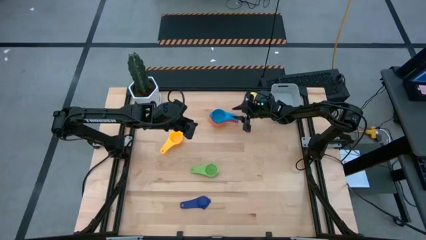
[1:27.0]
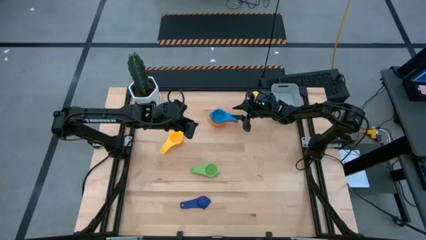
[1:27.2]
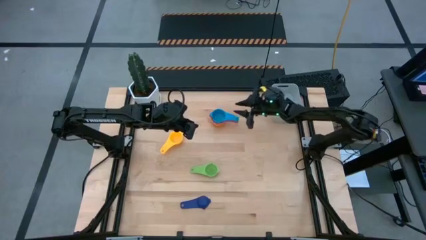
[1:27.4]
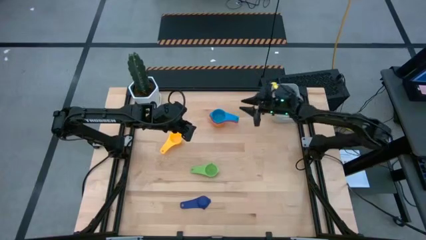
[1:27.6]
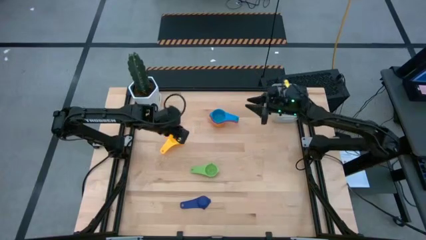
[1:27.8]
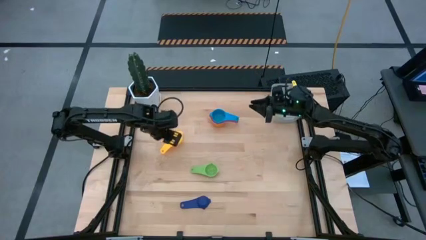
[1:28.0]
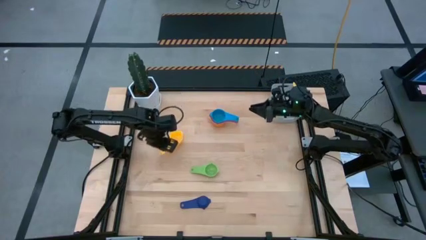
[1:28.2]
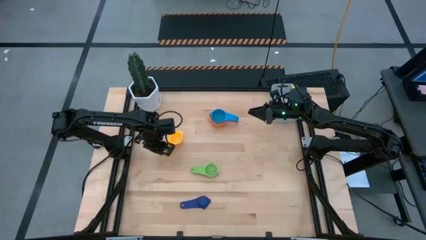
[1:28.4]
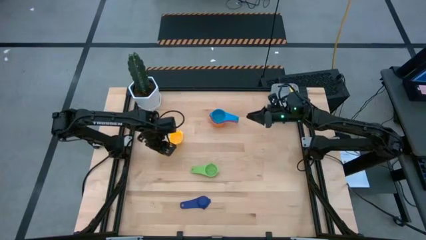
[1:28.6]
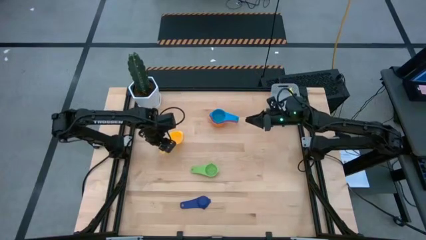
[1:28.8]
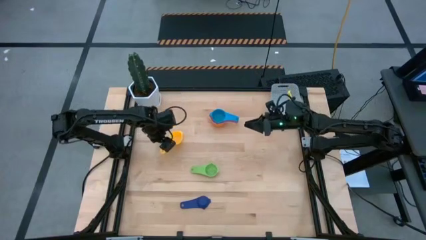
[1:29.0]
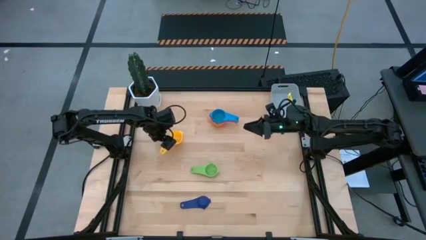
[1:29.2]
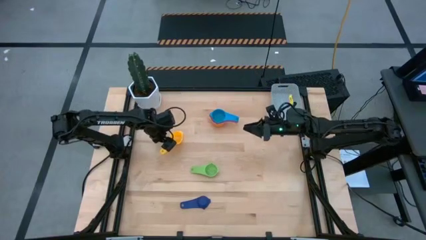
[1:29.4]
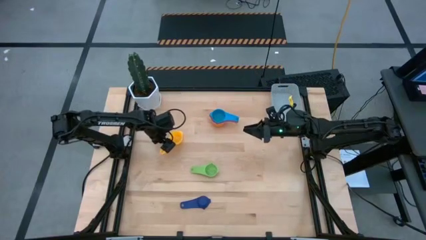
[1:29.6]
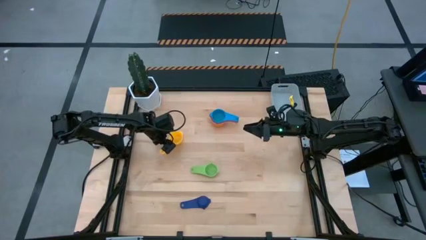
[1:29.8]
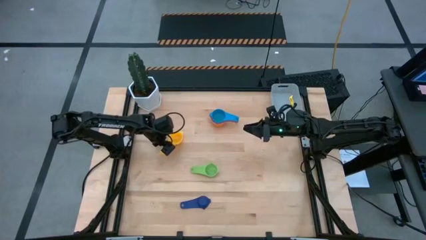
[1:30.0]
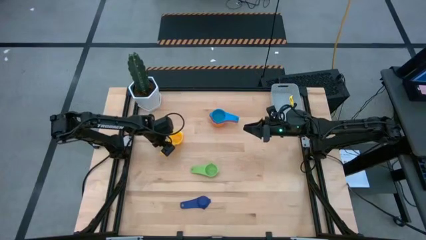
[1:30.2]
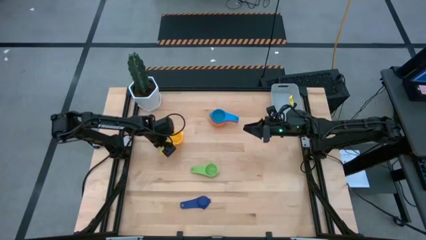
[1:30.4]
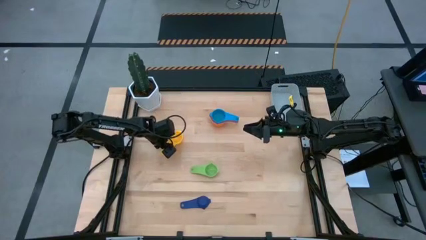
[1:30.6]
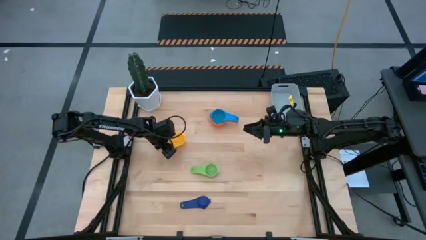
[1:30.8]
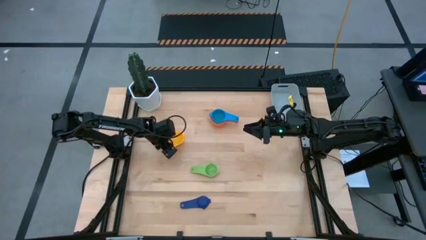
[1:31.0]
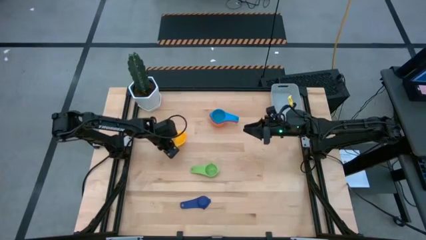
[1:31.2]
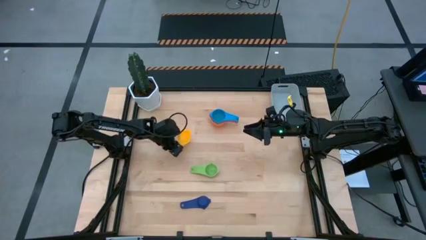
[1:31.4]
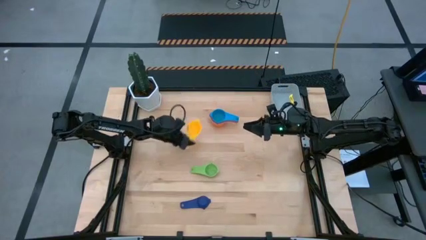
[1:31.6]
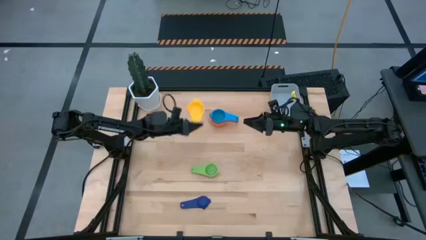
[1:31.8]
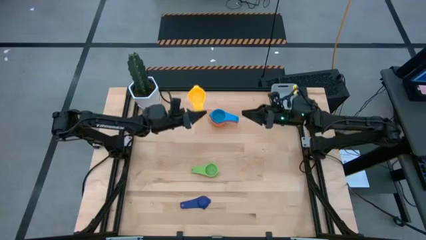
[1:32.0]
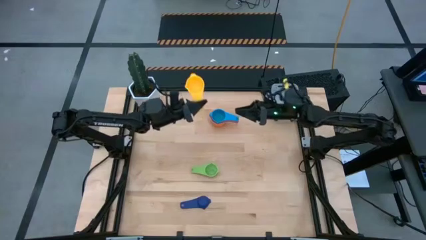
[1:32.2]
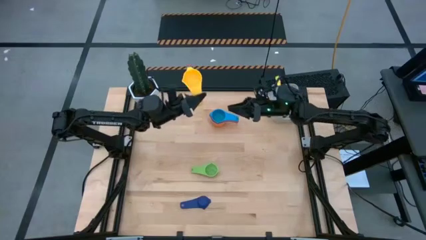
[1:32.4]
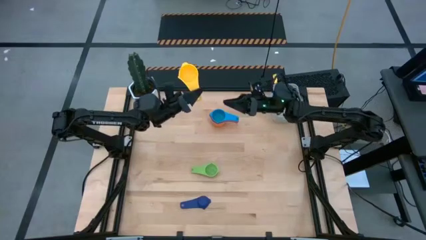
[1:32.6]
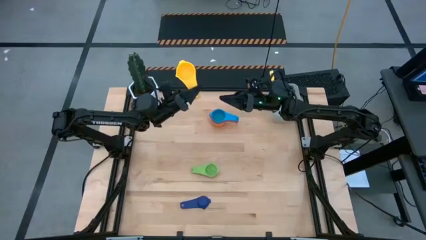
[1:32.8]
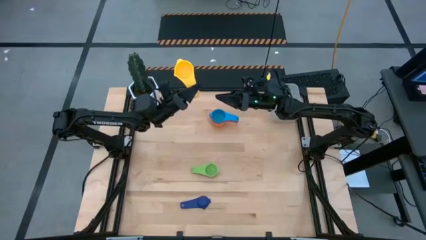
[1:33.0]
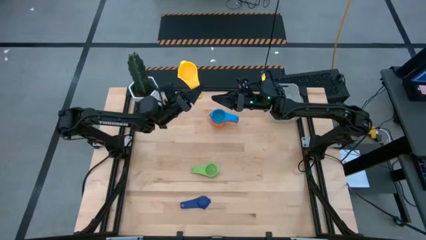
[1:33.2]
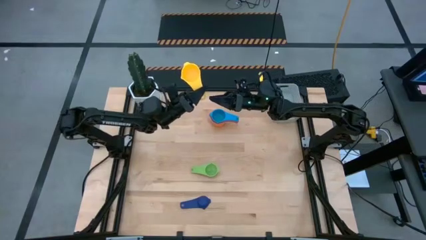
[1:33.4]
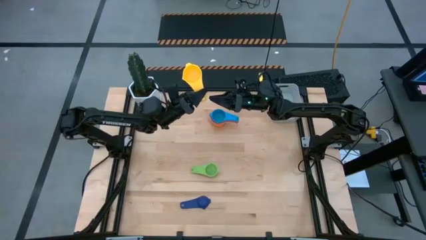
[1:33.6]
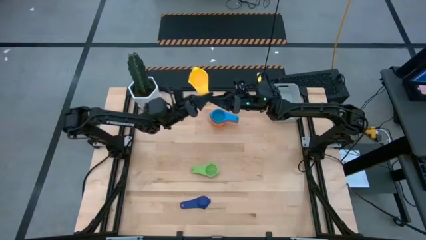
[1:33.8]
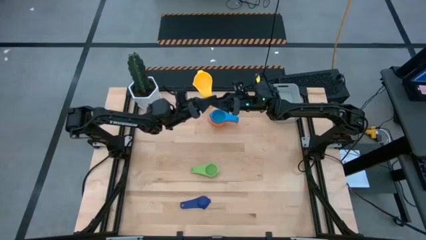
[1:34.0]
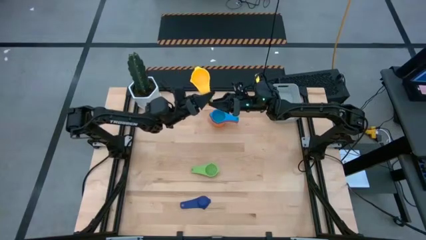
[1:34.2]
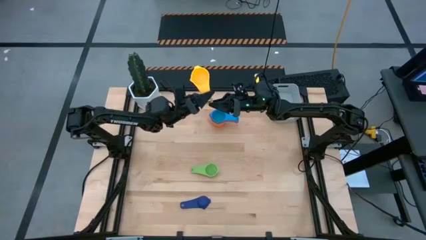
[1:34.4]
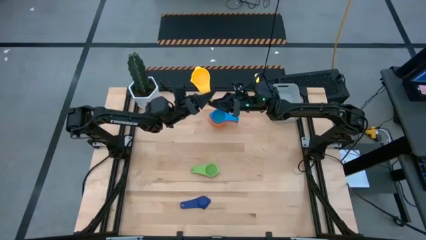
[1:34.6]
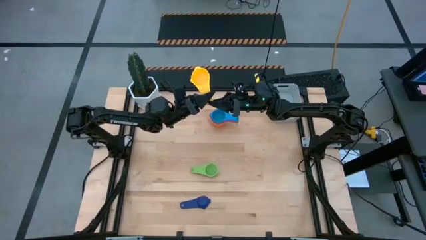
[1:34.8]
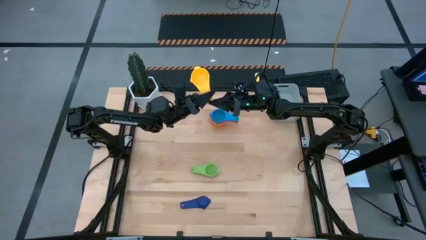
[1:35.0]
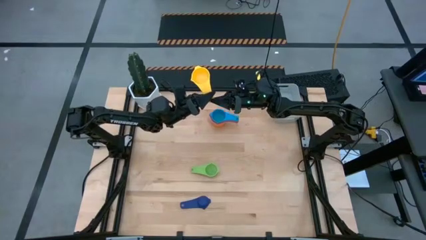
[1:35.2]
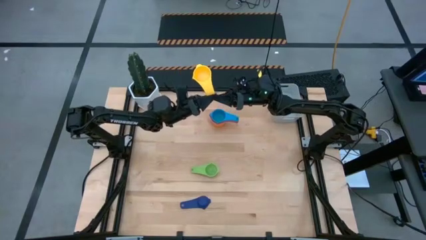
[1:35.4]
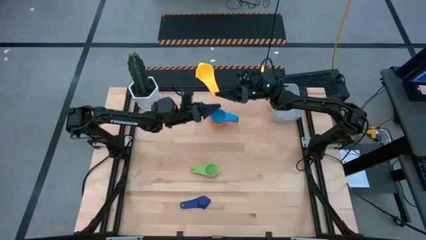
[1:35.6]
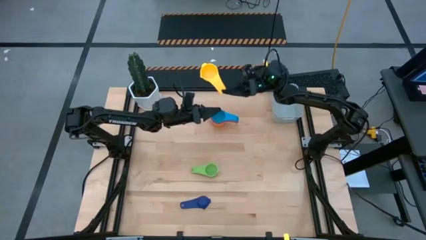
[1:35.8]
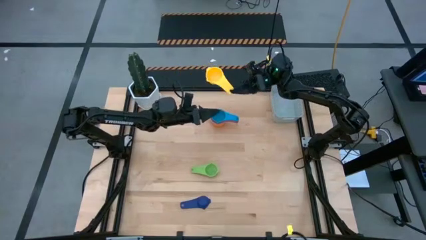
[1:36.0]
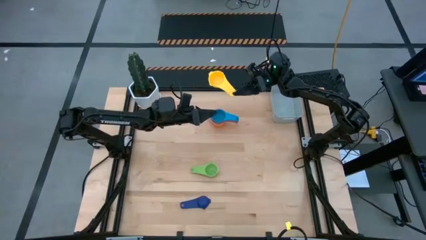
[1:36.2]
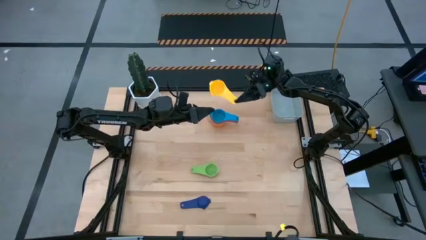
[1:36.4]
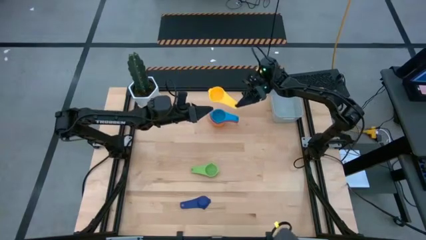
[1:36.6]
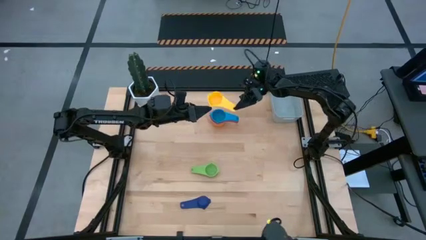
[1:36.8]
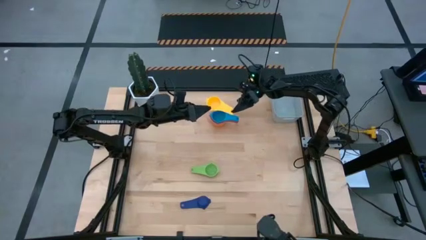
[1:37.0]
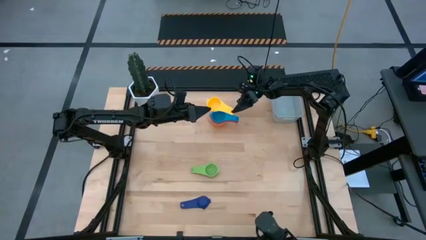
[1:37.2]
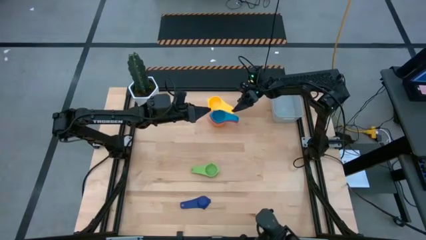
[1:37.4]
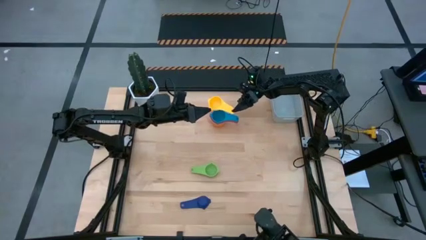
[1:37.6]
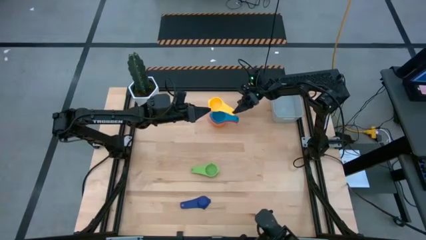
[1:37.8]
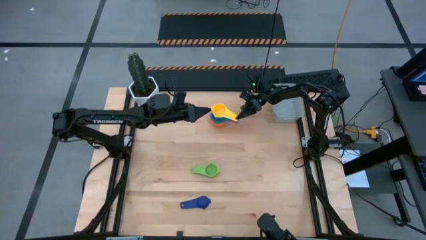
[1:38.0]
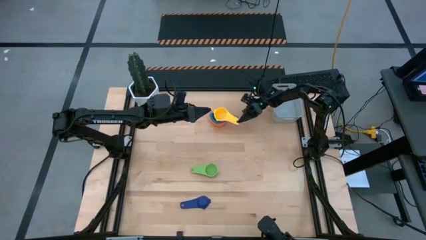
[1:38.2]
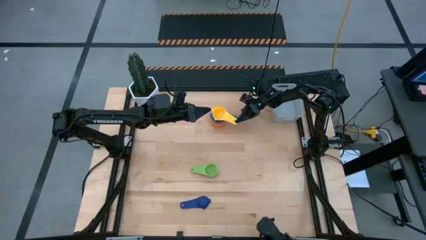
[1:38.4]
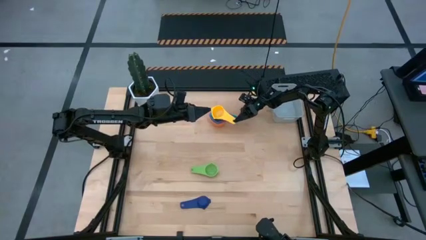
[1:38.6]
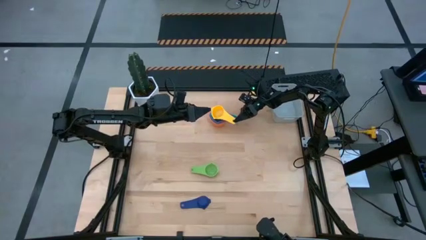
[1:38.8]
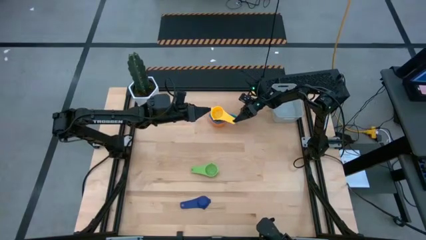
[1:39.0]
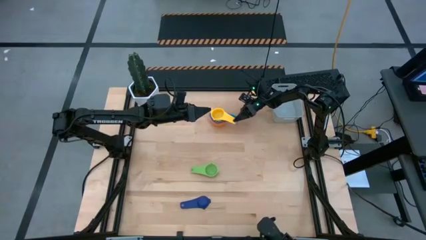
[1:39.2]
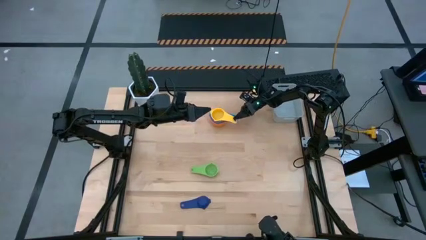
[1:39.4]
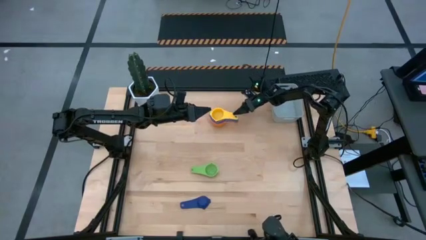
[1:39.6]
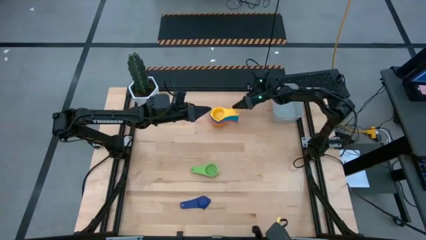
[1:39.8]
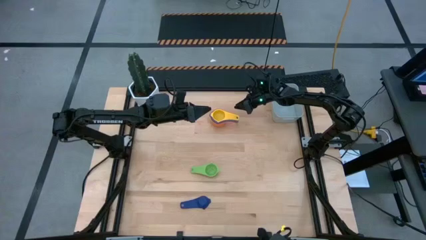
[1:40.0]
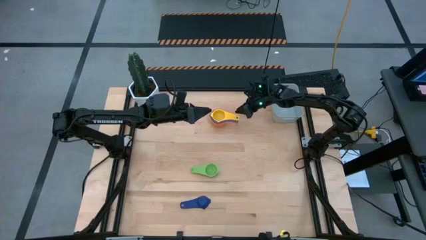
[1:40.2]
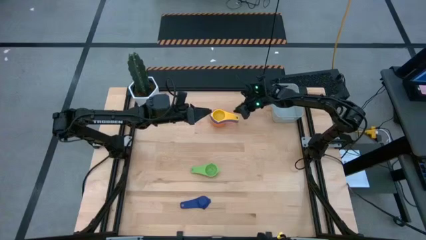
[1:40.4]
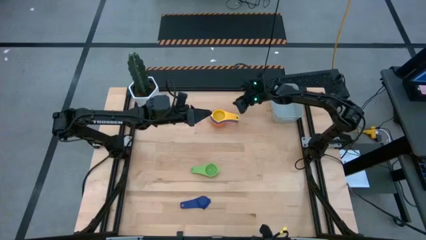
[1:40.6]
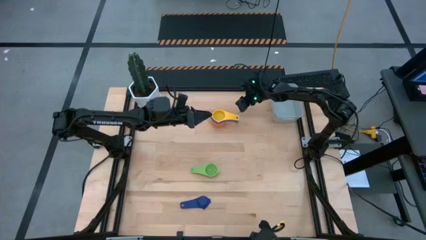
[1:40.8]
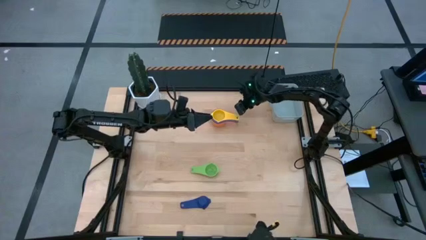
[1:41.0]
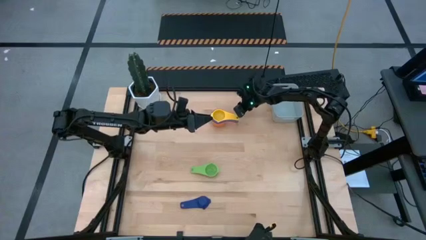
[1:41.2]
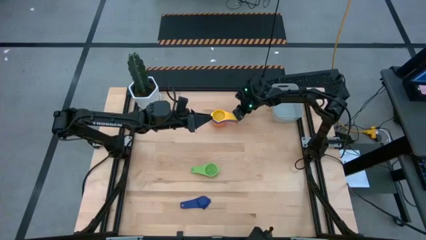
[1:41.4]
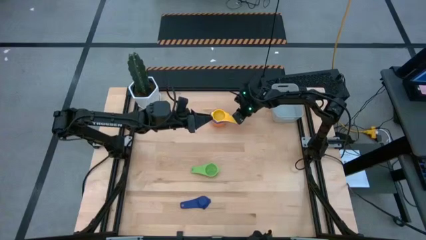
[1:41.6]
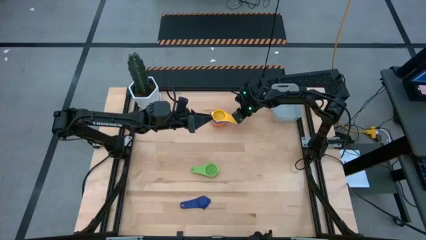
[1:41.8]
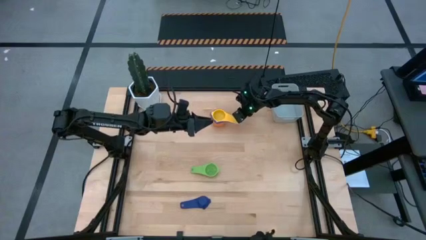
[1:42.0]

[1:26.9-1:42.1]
Task: Nest measuring cups in basket
Stack the yellow measuring cup on top of the light blue measuring cup

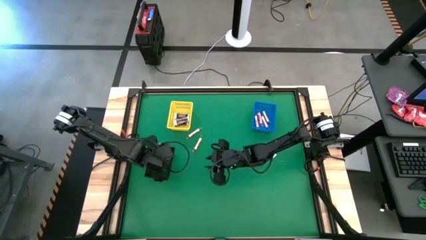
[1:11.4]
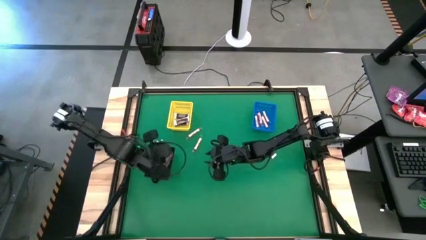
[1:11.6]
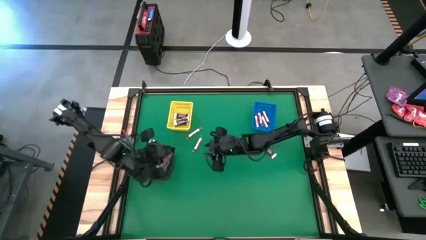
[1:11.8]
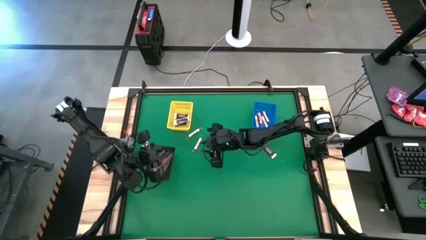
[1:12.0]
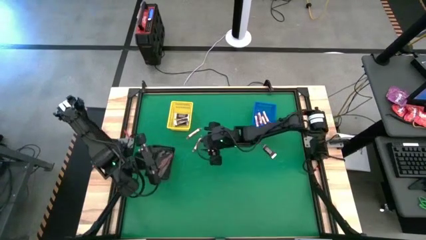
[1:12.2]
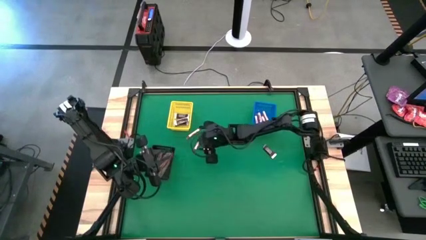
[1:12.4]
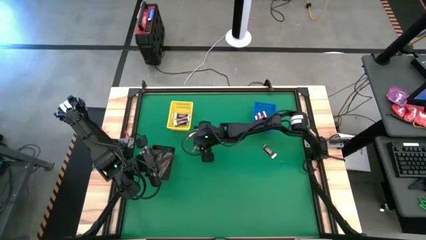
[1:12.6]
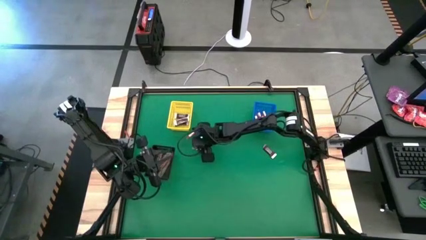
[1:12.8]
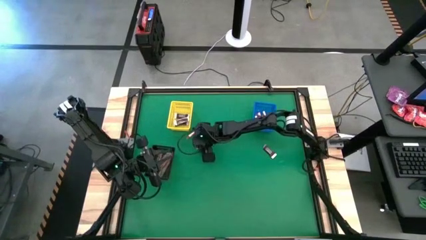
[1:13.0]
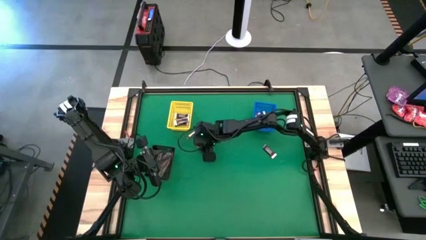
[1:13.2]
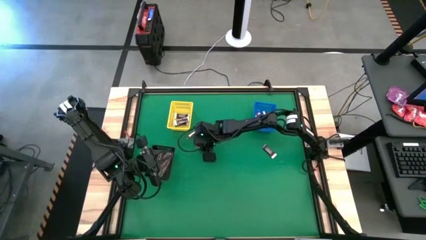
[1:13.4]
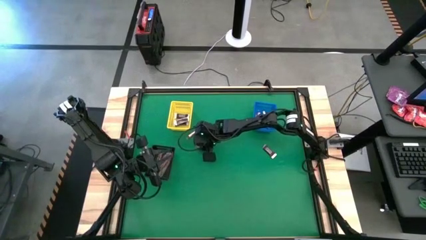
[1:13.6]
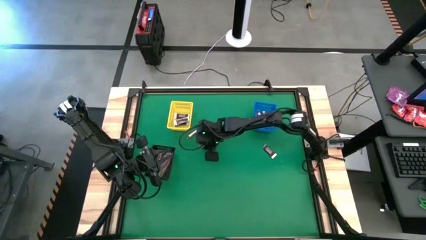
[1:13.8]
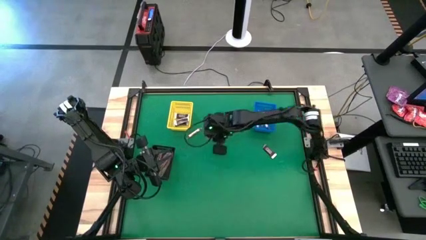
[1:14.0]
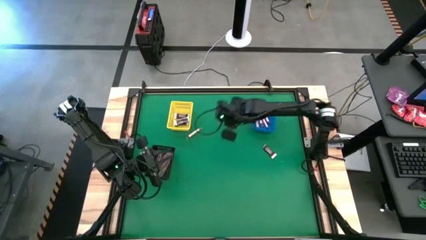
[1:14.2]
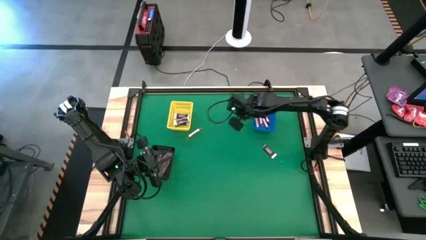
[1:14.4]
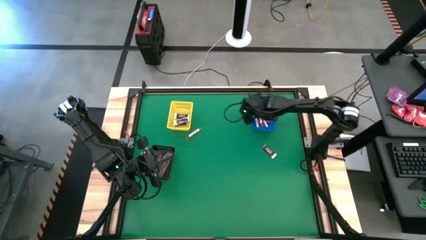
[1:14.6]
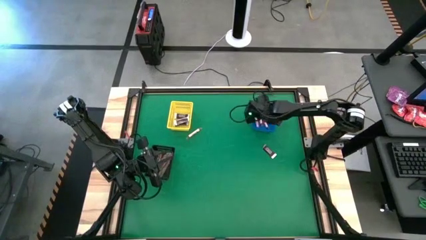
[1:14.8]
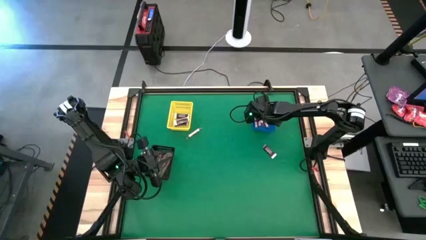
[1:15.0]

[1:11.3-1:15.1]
Task: Sort candy by brand, put in halloween buckets
Put the white candy stick into the blue bin
